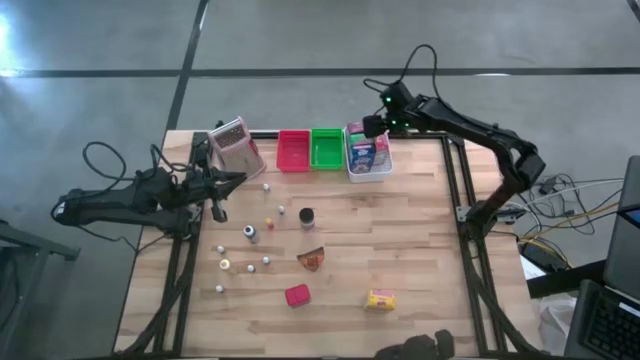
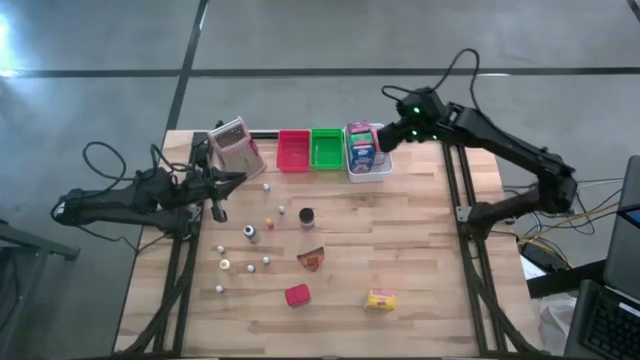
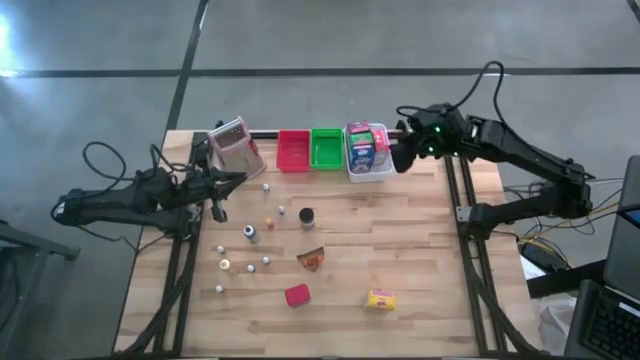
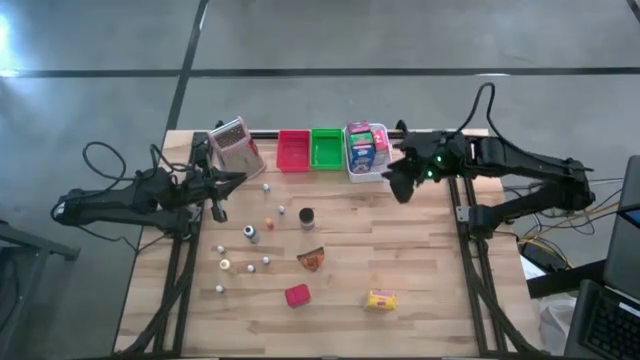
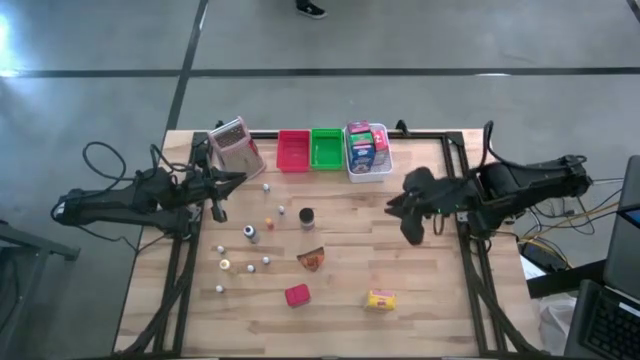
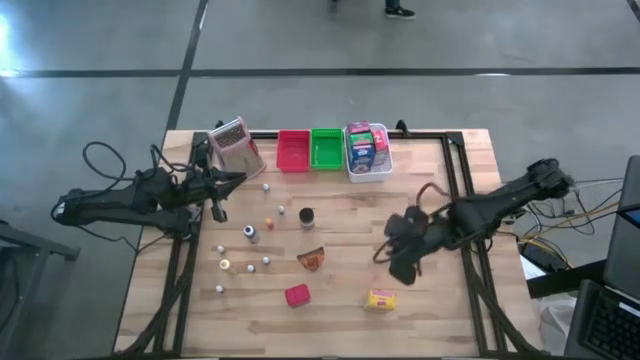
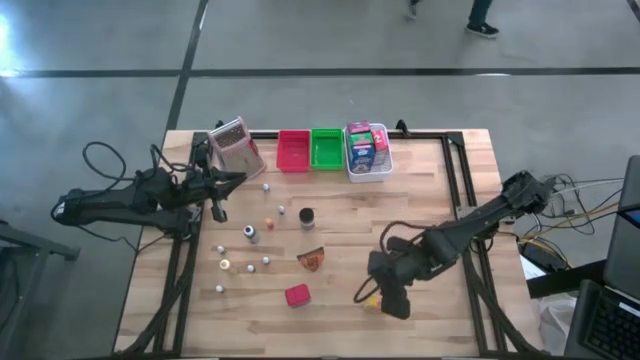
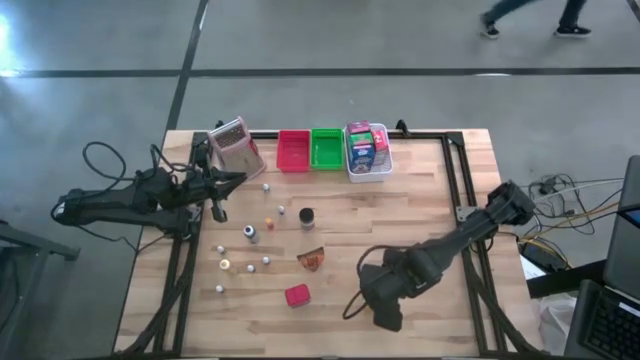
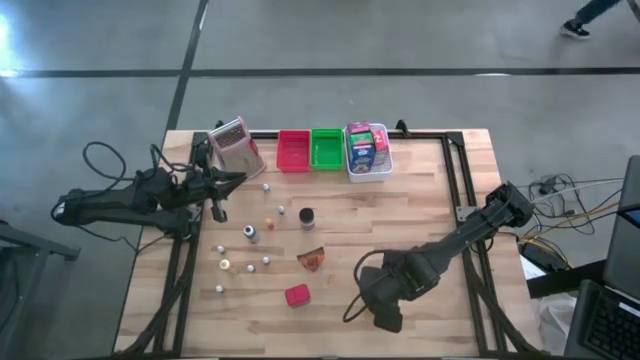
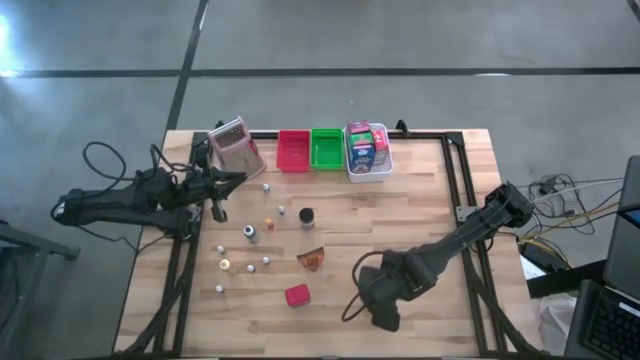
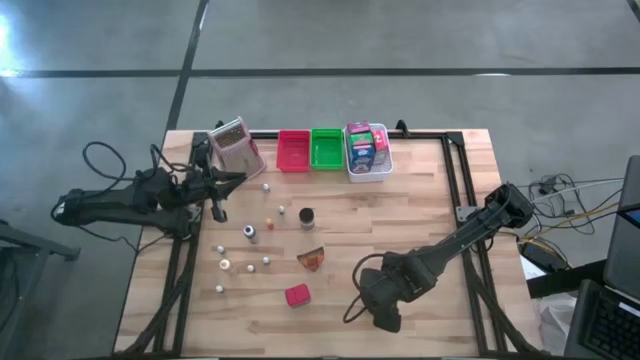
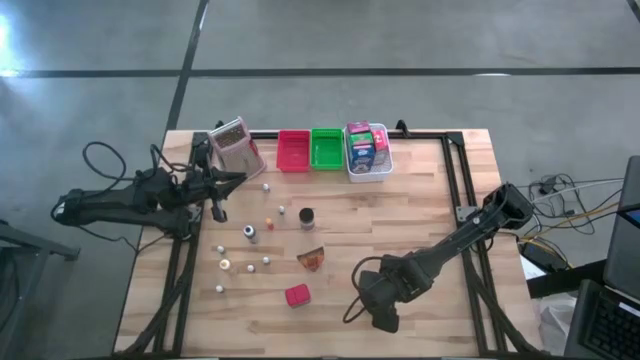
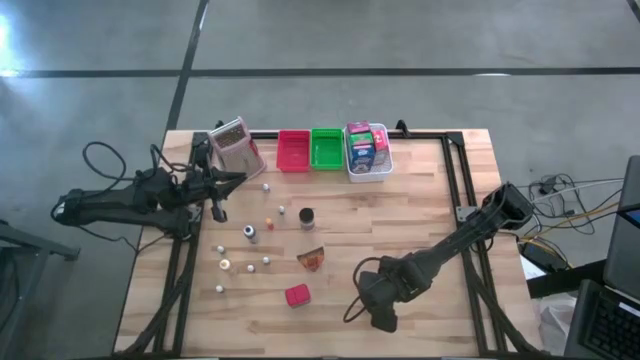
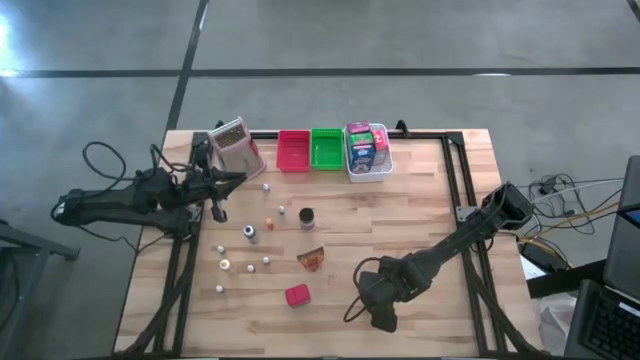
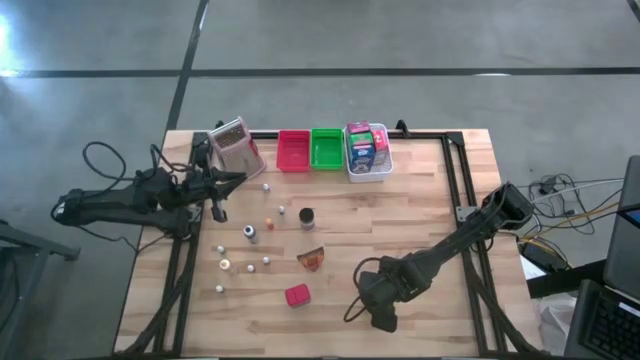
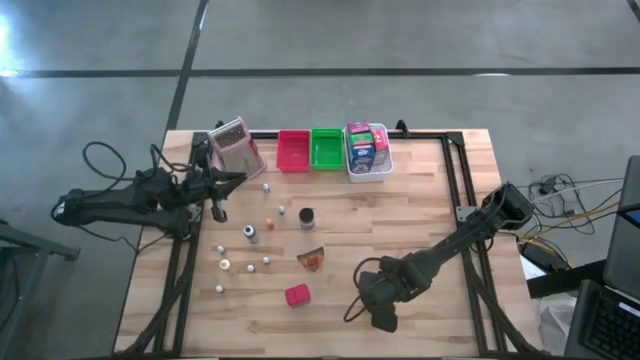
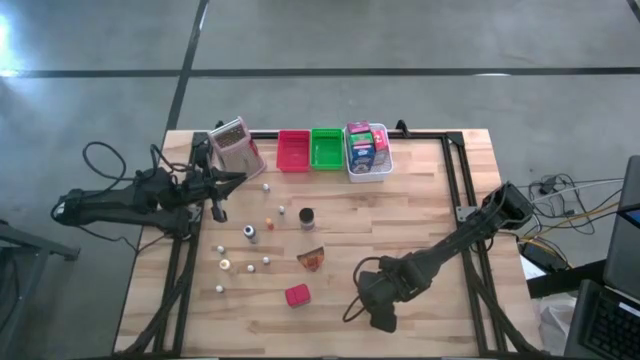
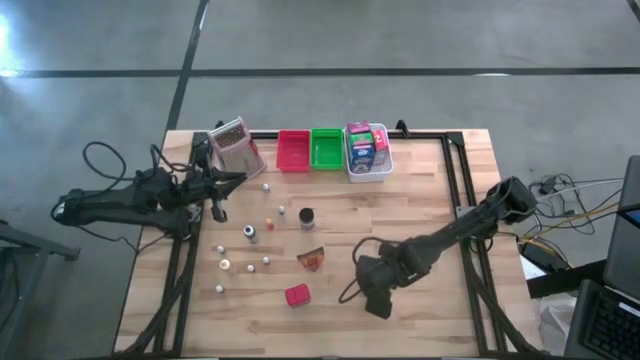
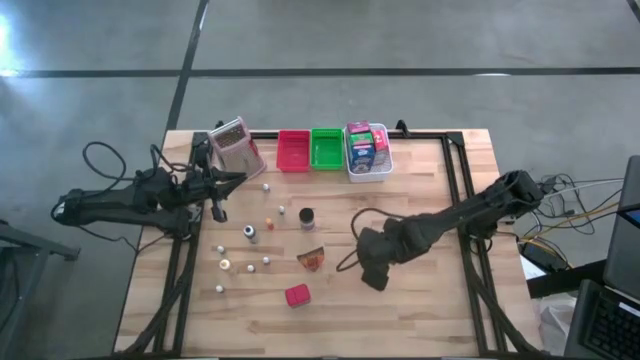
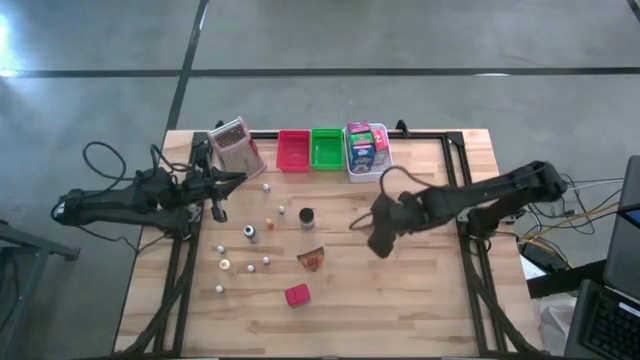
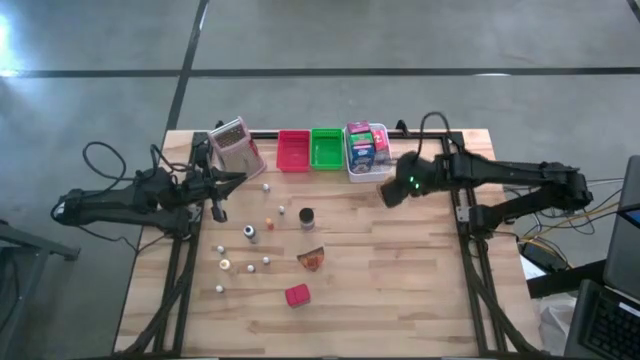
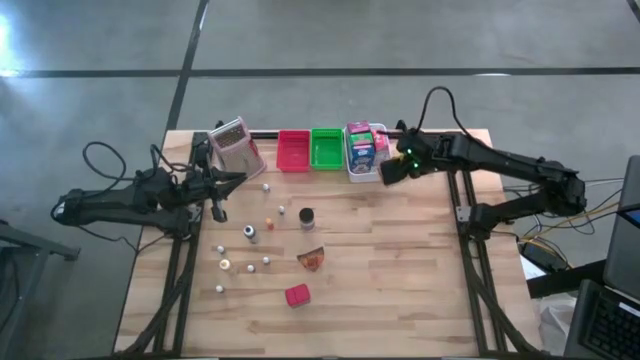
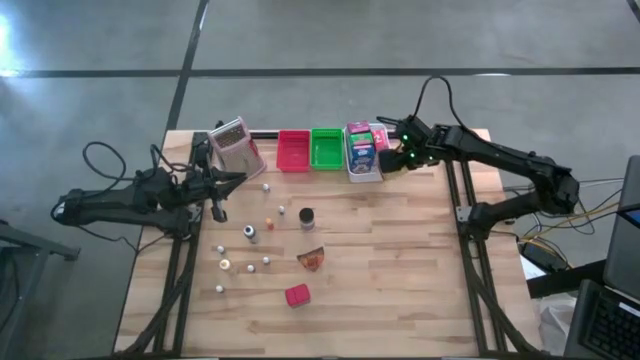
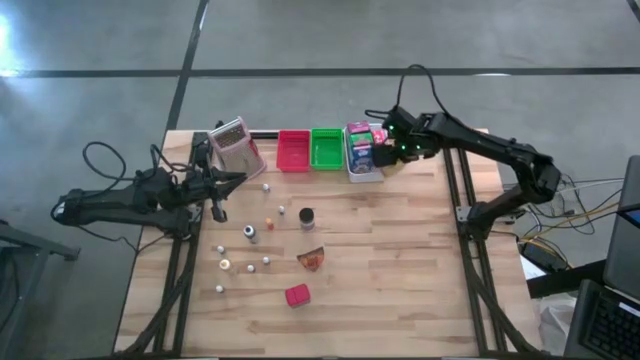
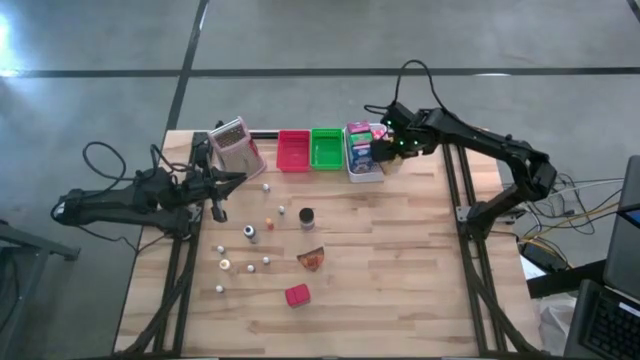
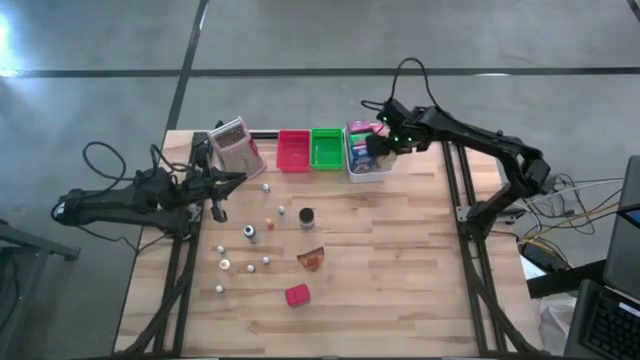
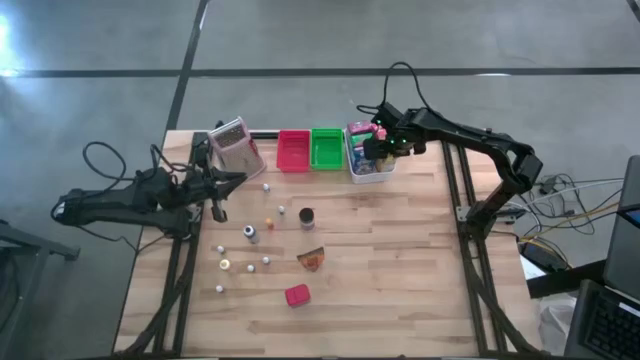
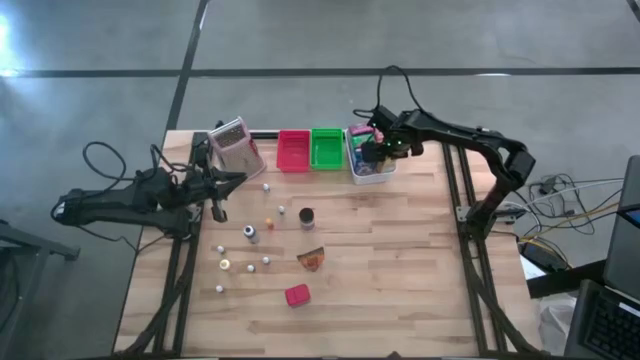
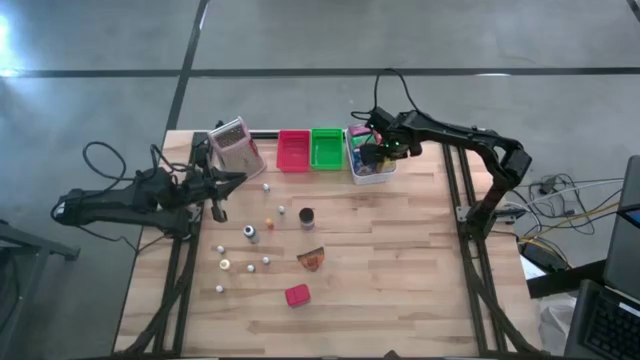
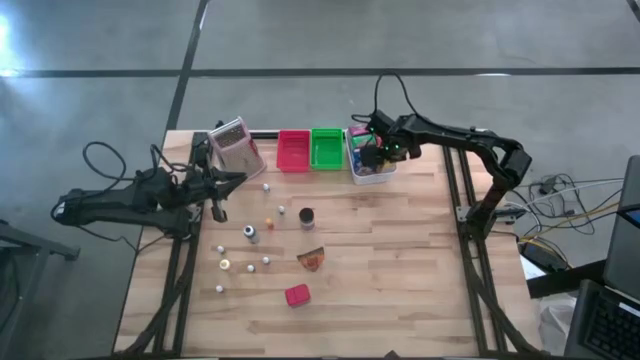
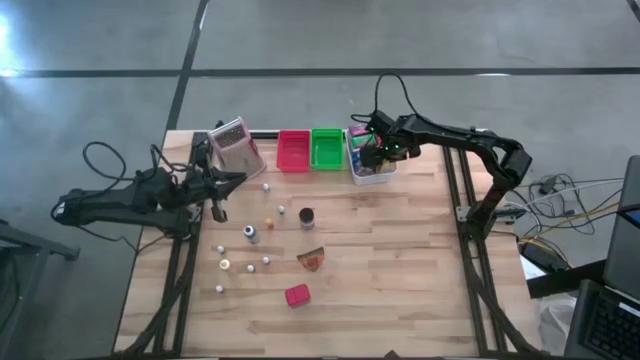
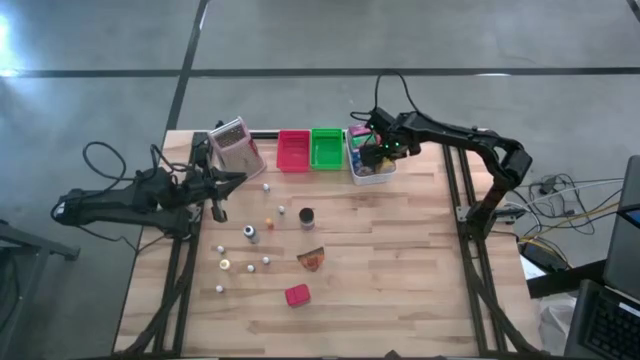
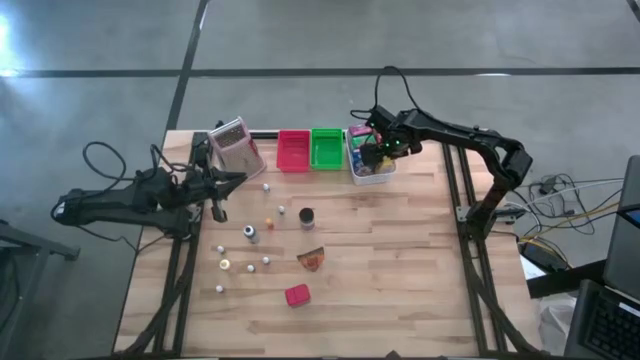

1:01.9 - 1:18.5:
Task: Pick & Place Kitchen Items
Put the yellow cereal box into the white bin

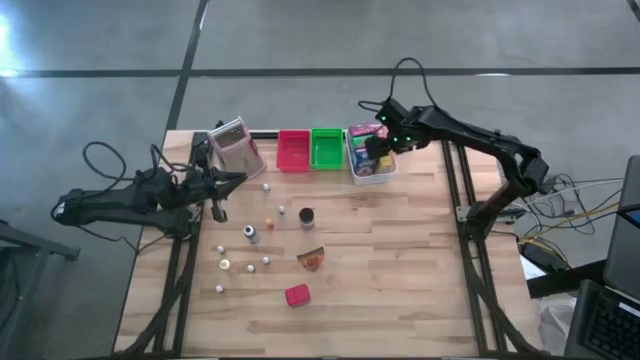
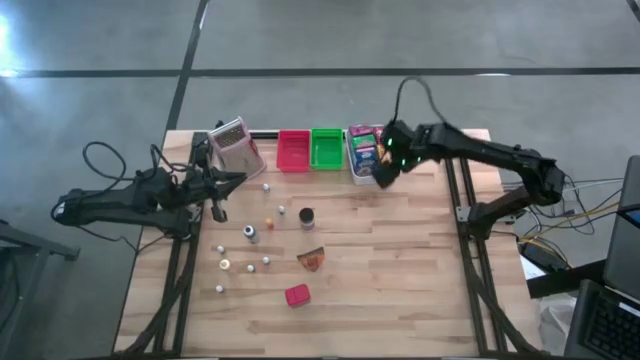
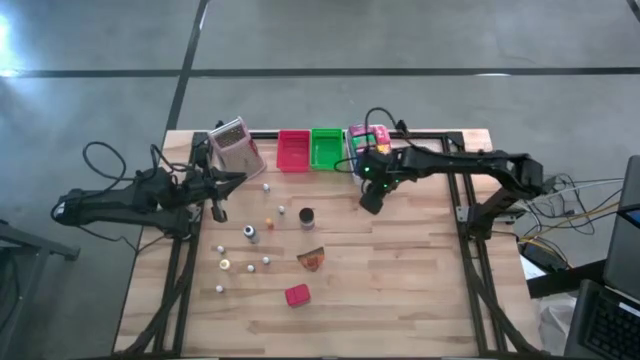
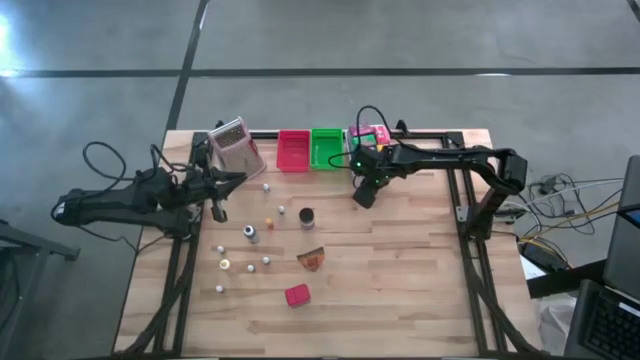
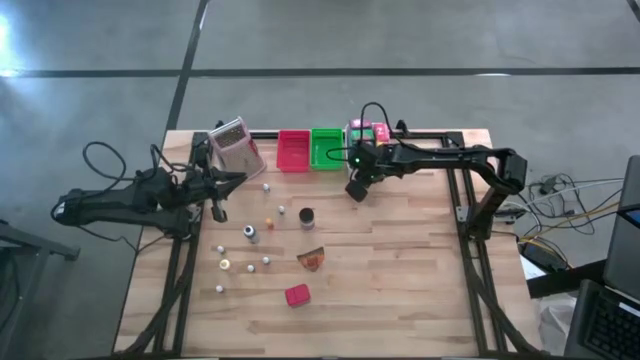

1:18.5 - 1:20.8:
Adjust white bin

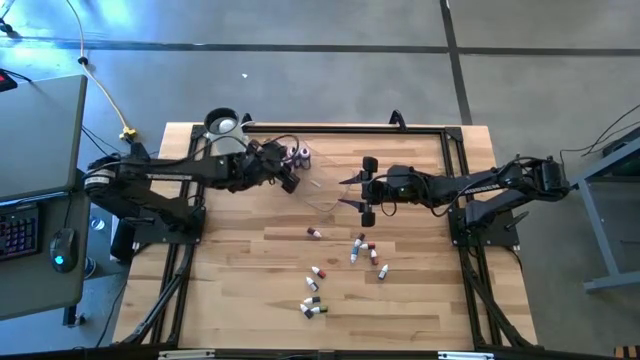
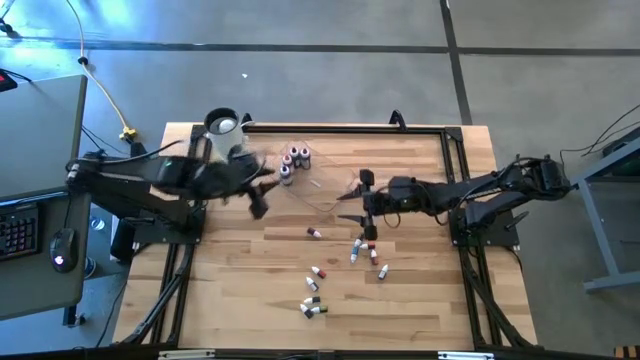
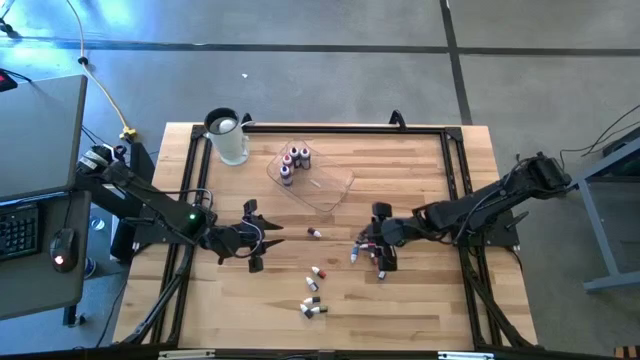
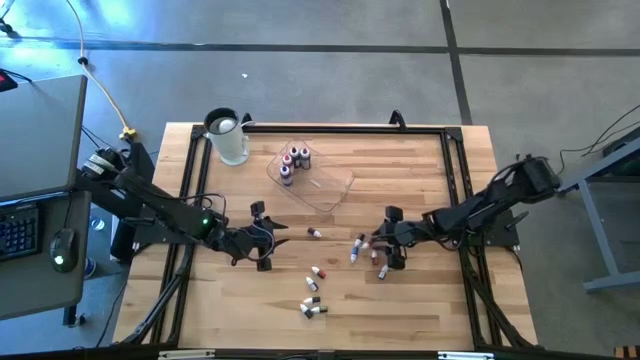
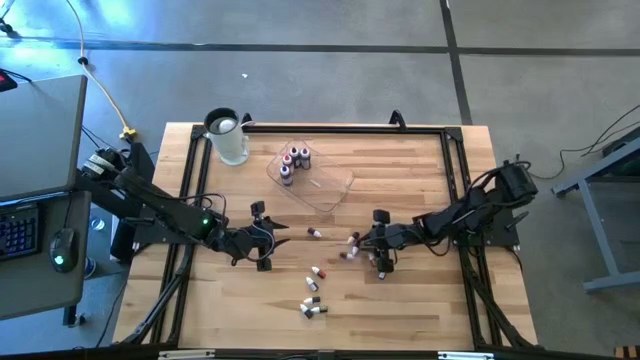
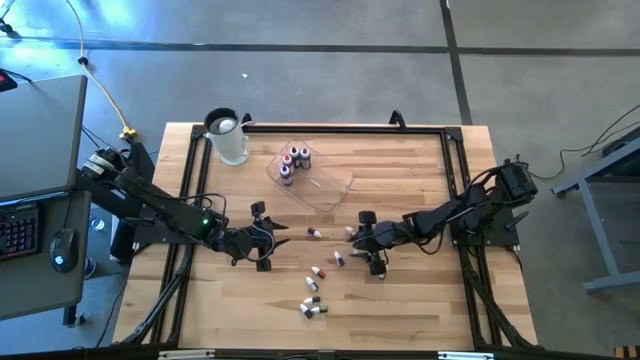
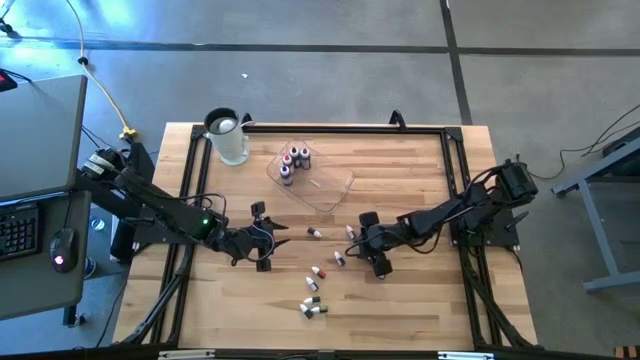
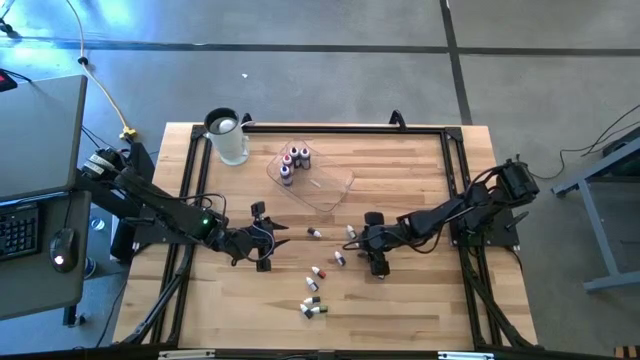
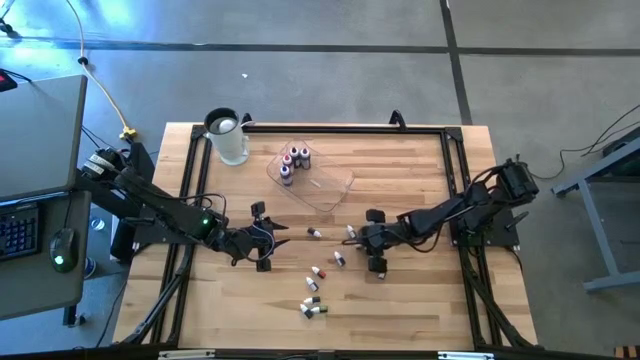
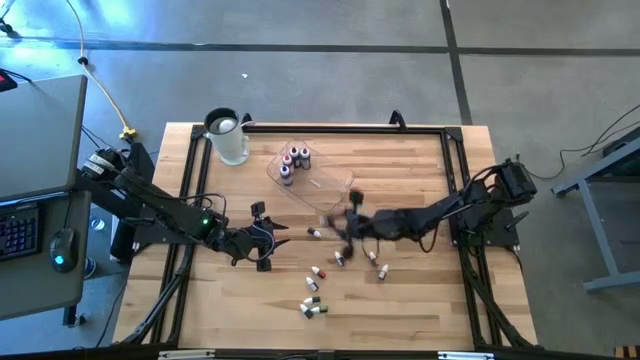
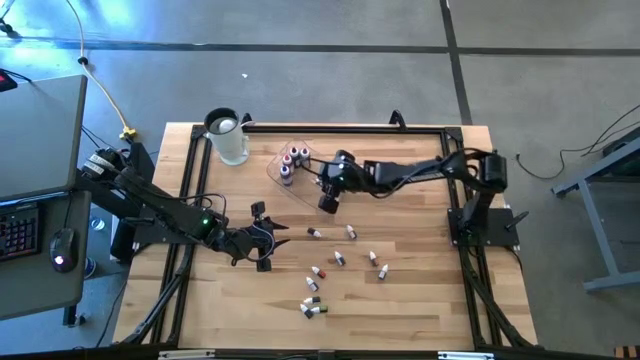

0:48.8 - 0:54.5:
Task: Pick & Place food coloring
Put the right small red food coloring bottle into the bin
